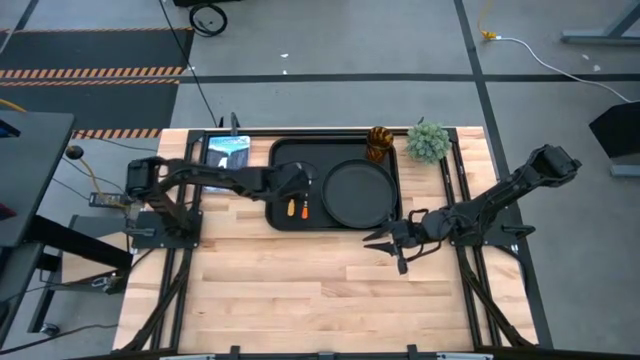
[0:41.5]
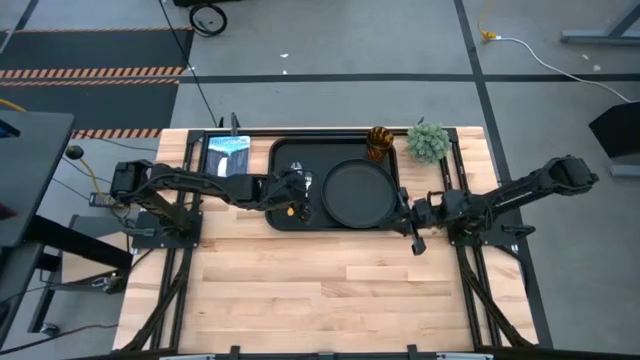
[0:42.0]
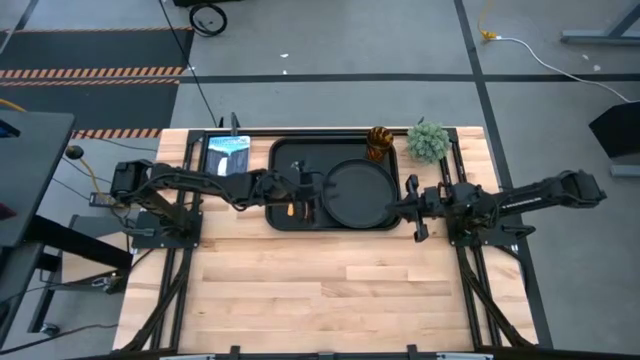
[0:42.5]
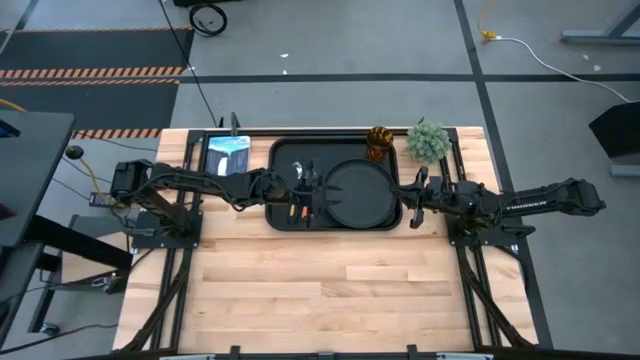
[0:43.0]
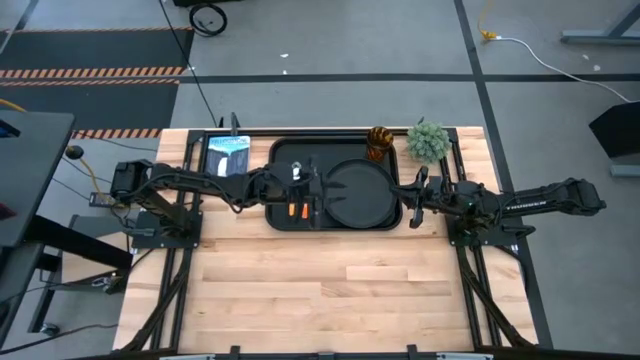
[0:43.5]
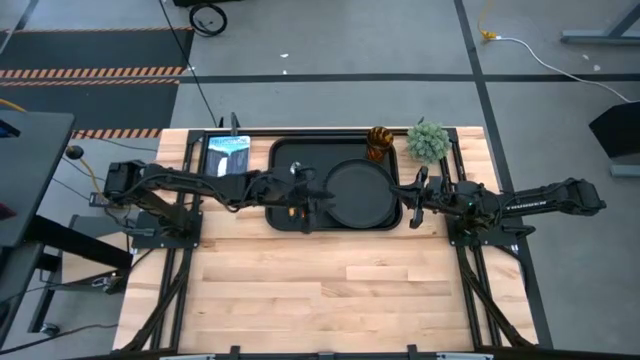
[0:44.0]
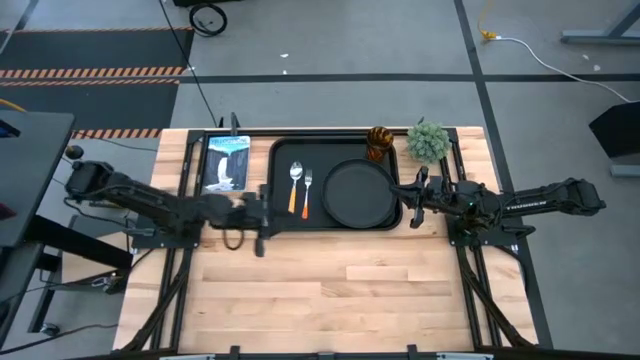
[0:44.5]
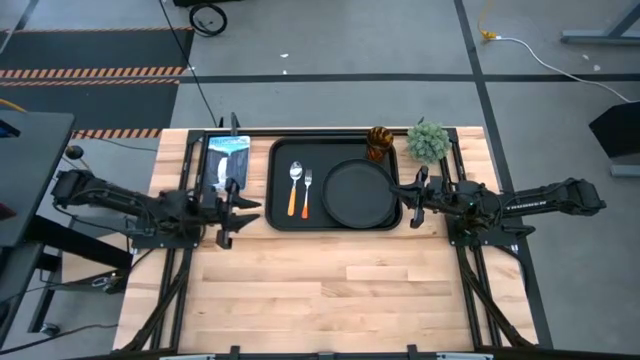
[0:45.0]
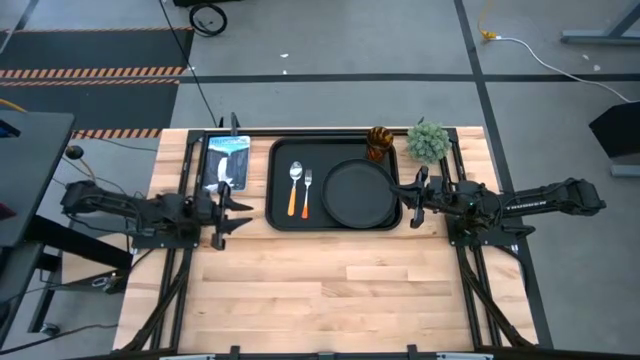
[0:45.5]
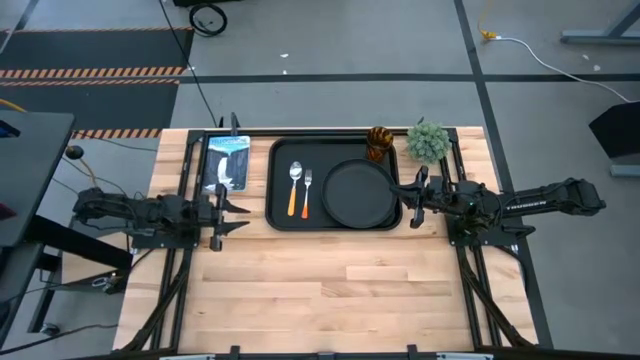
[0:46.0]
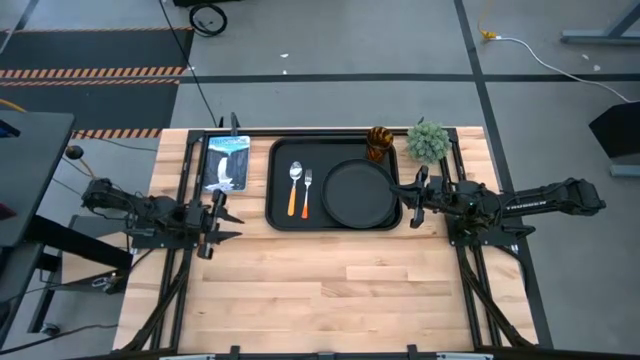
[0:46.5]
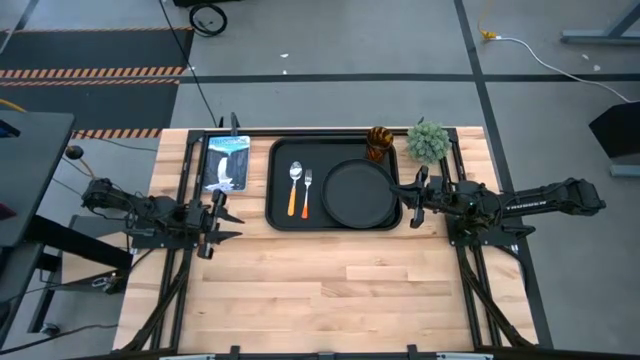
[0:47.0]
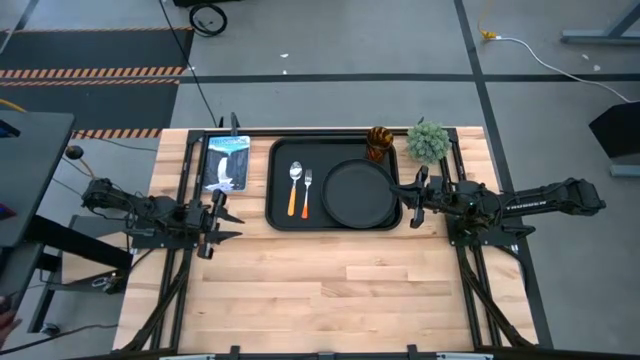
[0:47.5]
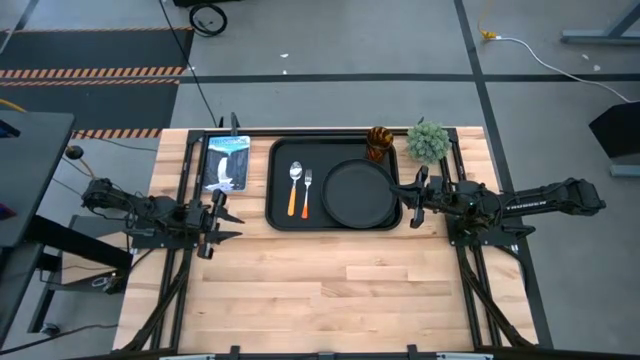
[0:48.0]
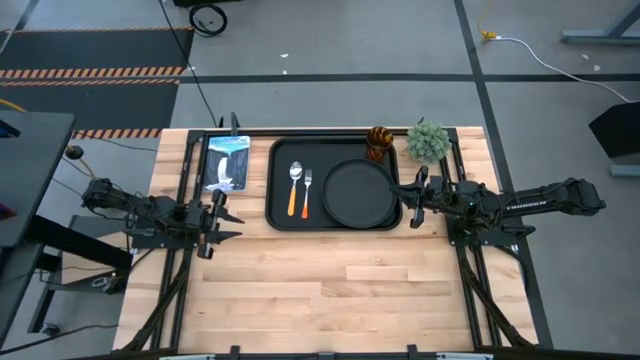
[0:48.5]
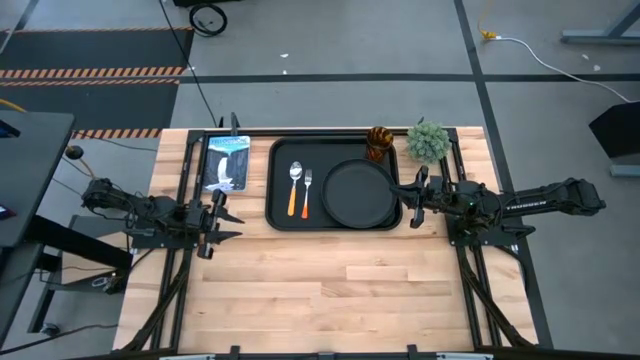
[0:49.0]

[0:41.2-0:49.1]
Task: Pick and place plate/cup/fork/spoon on tray
Return to Home Position

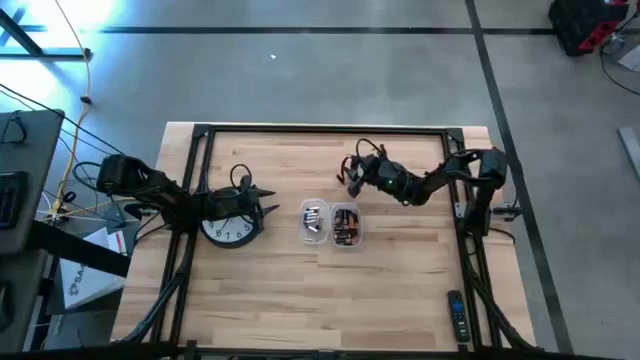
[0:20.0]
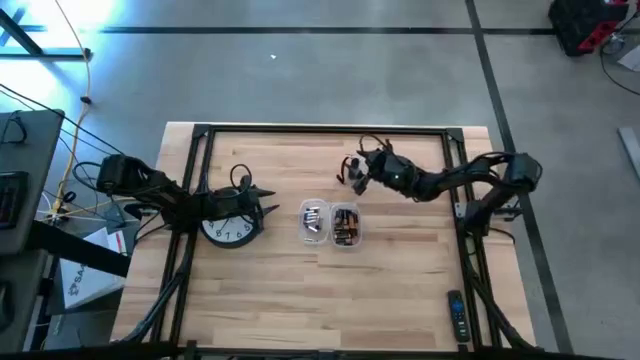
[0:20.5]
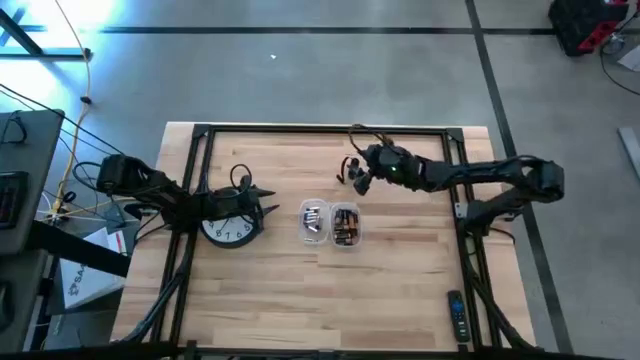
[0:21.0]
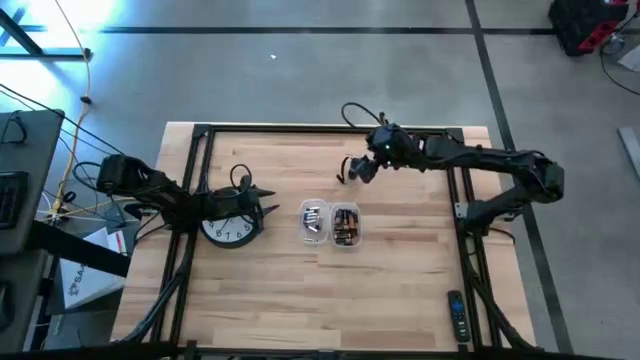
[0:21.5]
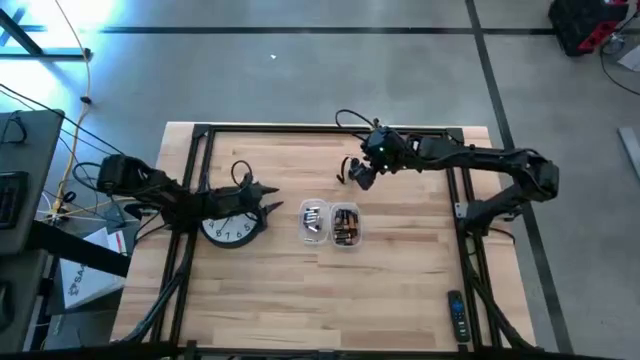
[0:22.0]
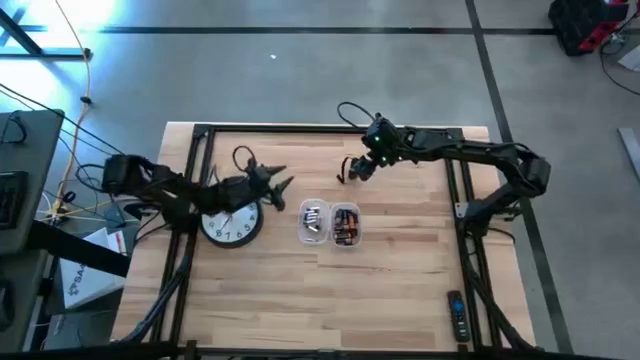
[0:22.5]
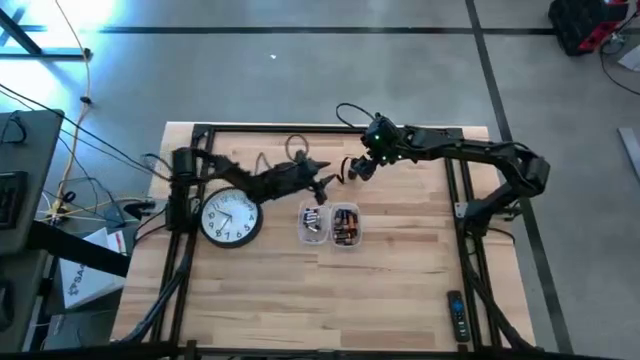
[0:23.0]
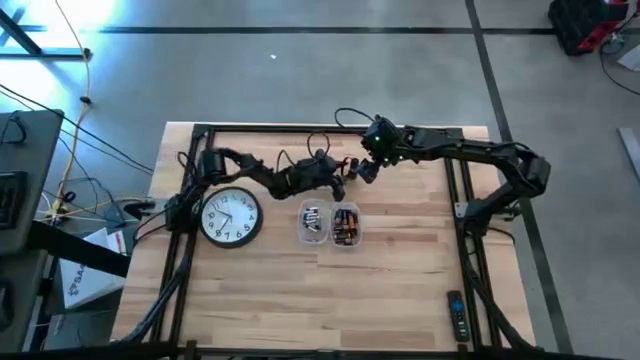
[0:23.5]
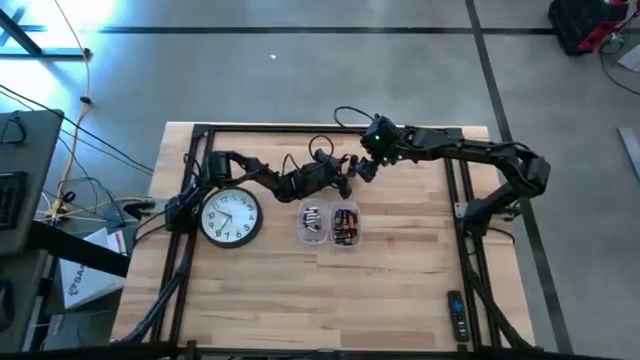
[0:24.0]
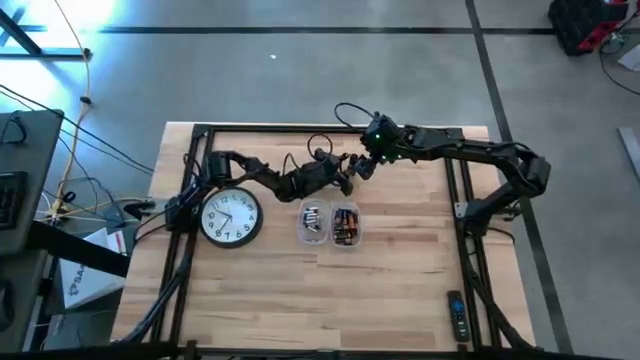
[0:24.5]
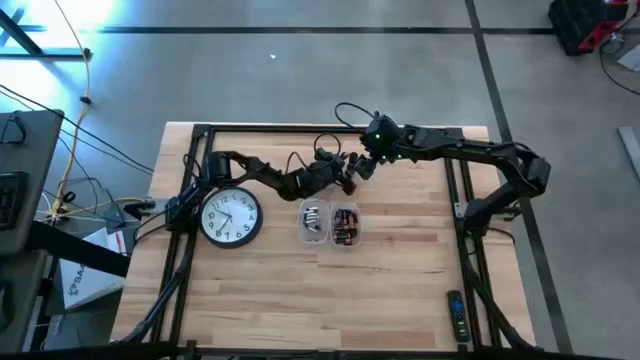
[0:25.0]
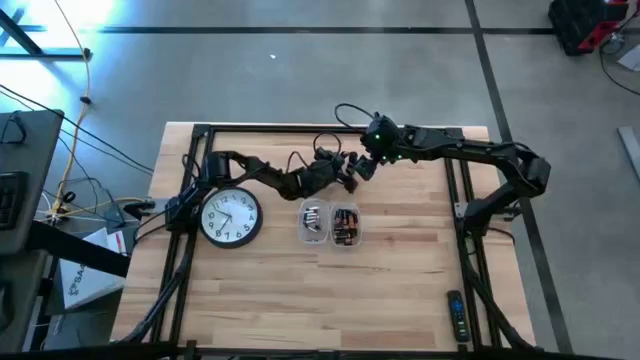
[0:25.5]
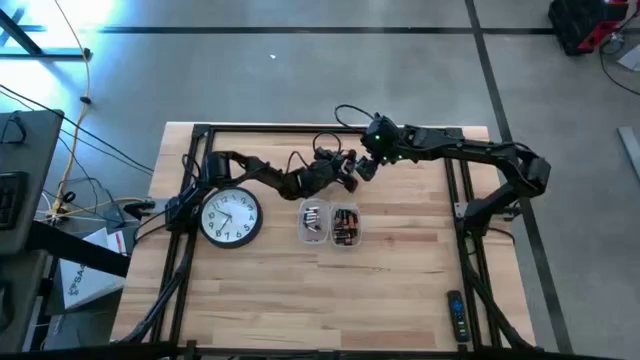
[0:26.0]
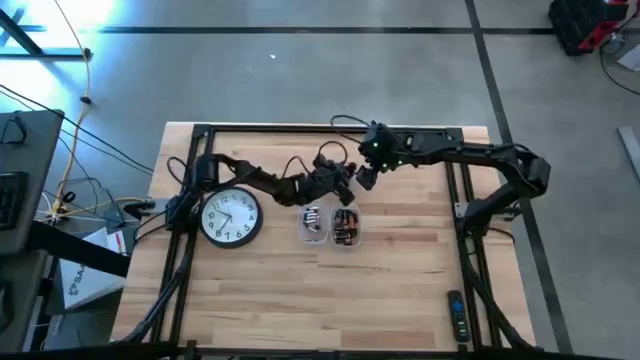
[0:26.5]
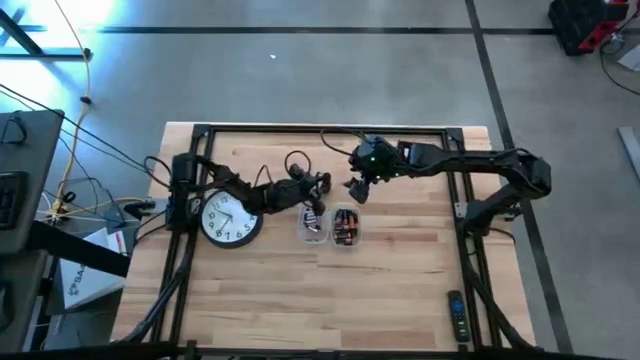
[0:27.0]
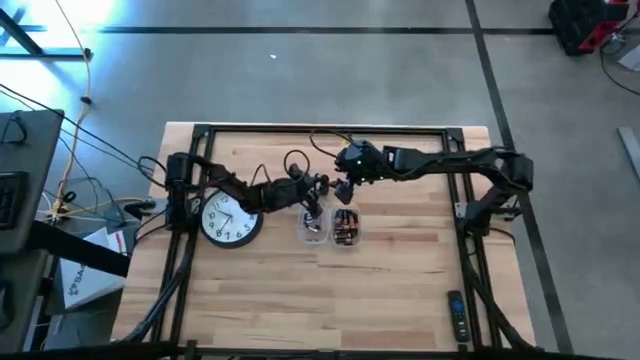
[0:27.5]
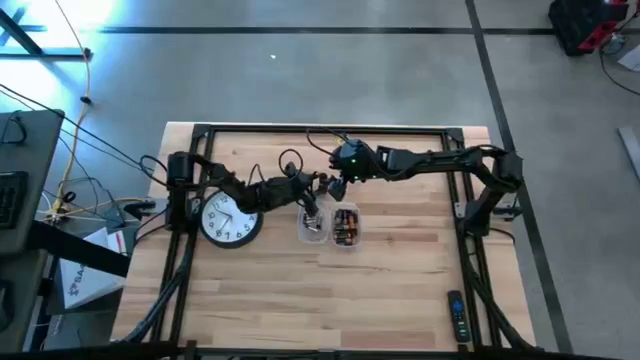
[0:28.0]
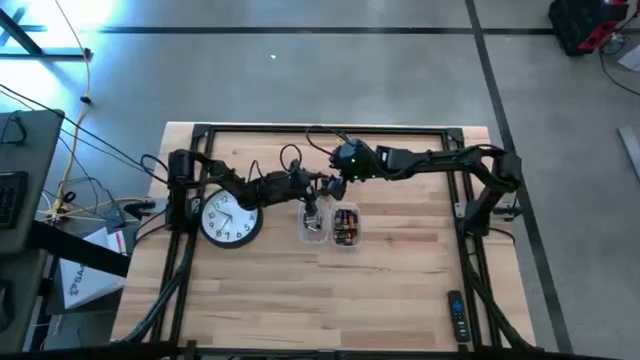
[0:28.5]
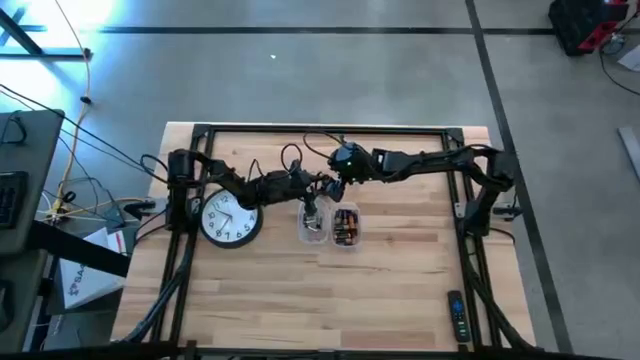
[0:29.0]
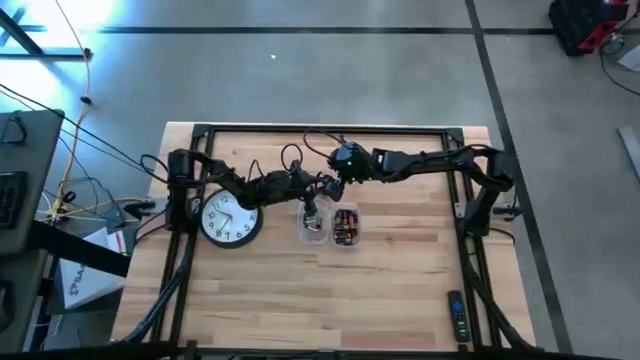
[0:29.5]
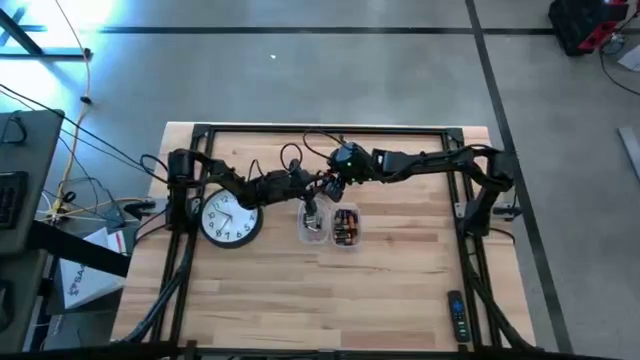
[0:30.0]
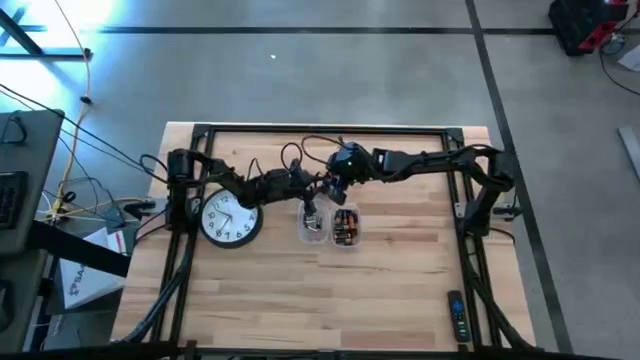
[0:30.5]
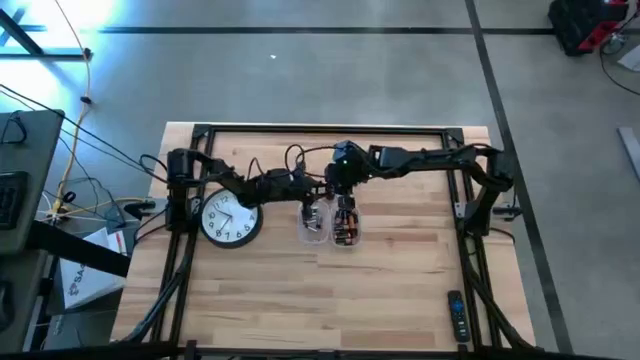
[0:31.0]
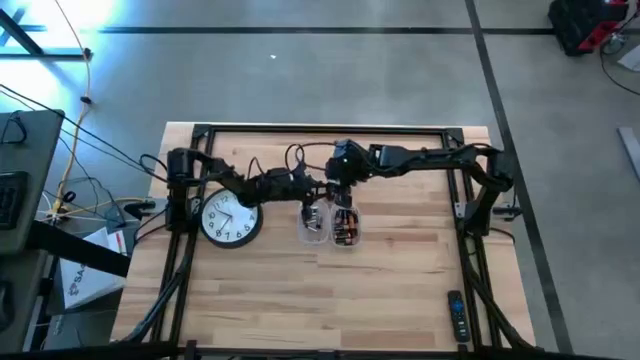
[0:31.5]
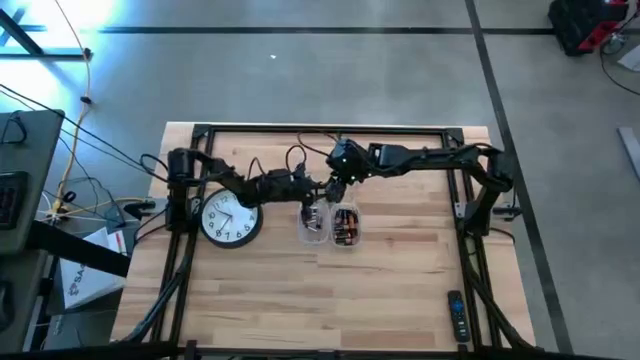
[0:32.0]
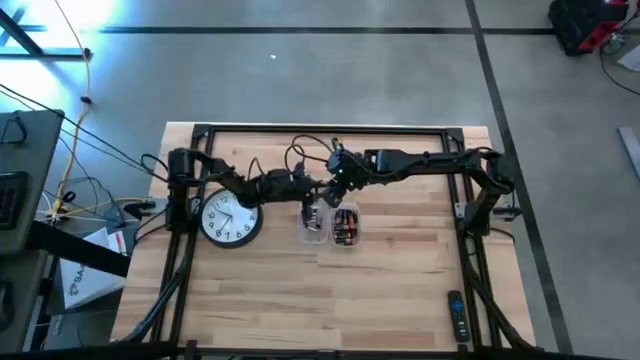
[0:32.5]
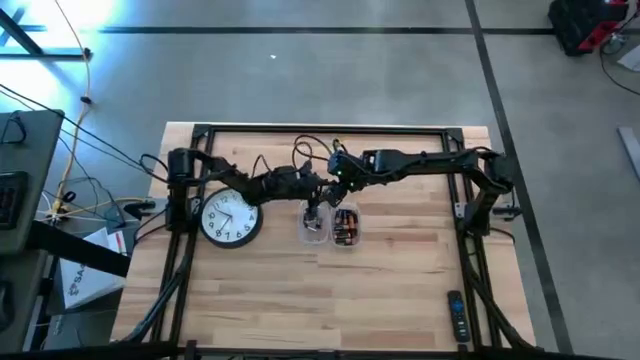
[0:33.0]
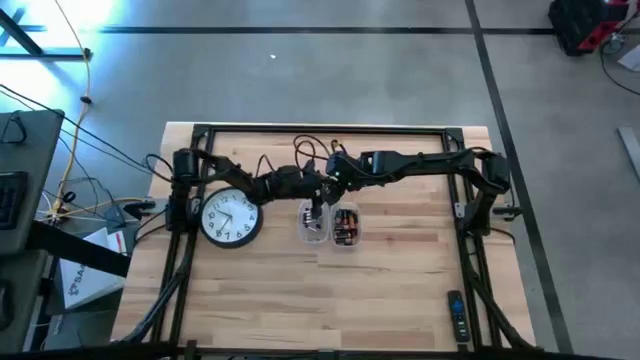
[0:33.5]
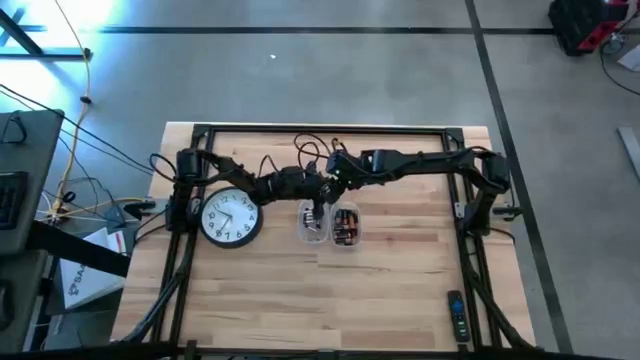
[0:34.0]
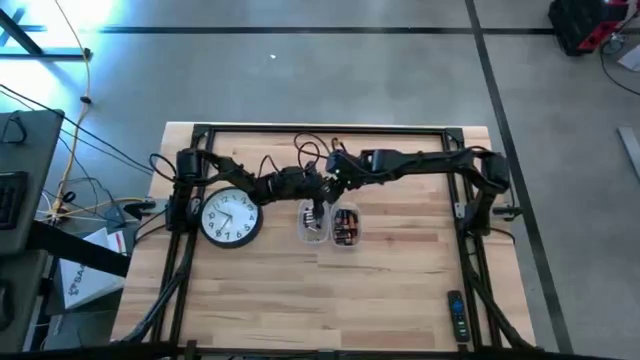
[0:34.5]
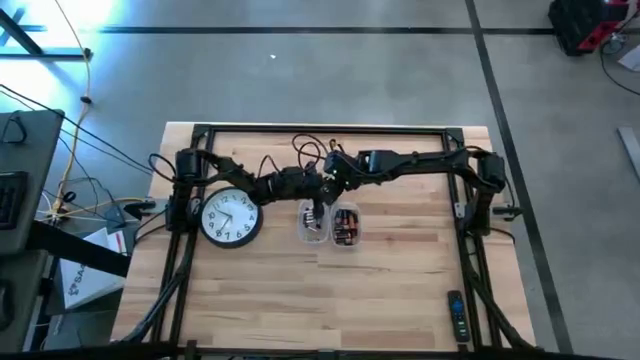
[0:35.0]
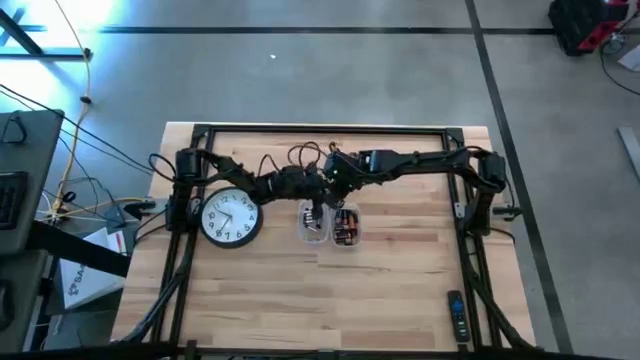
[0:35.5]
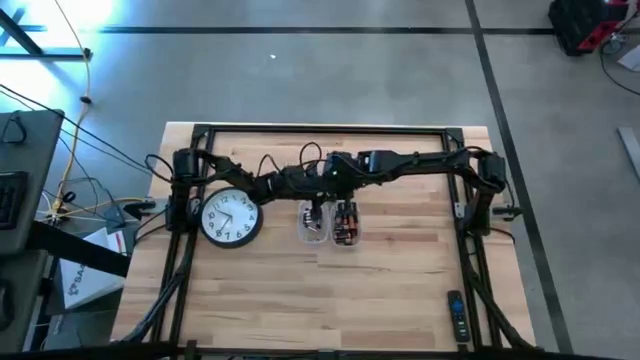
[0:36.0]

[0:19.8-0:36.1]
Task: Insert battery
Open the black flashlight lid
